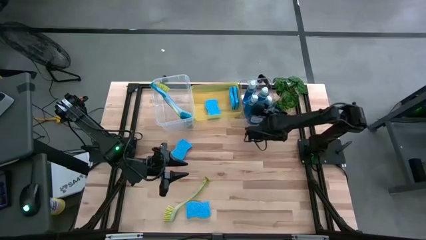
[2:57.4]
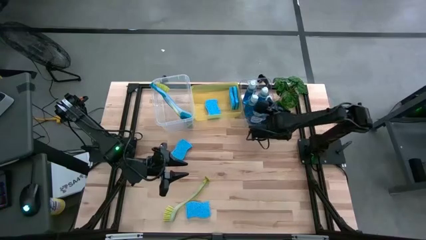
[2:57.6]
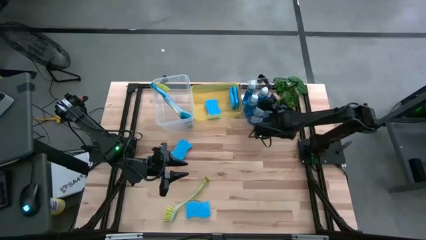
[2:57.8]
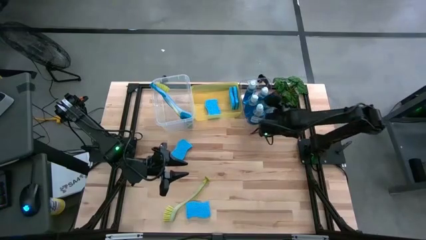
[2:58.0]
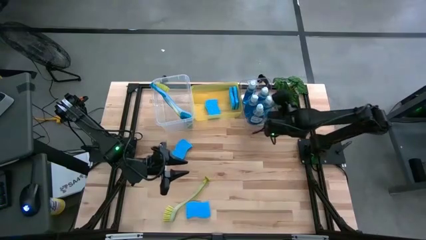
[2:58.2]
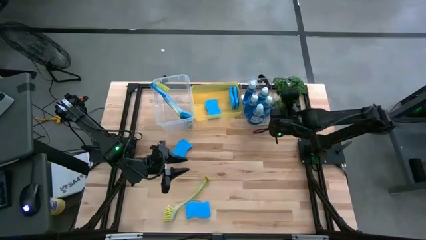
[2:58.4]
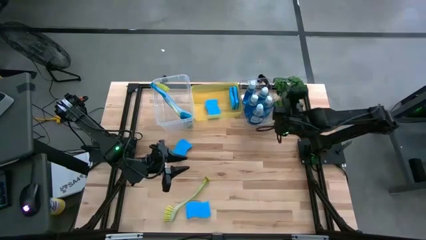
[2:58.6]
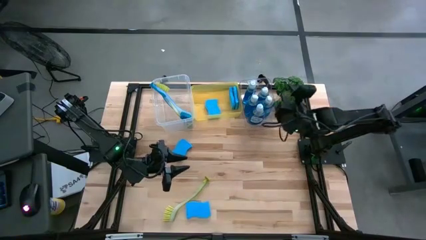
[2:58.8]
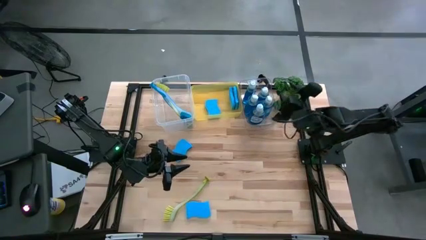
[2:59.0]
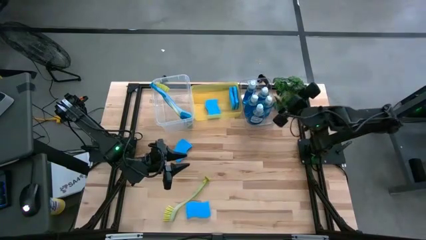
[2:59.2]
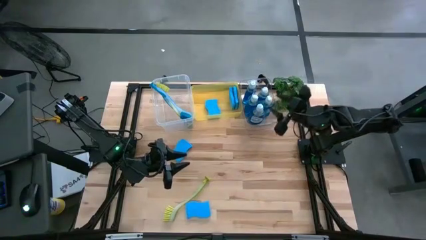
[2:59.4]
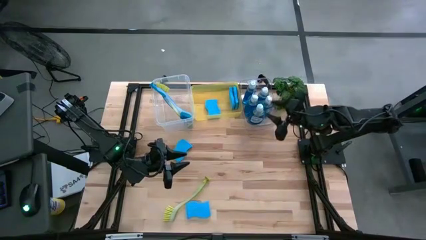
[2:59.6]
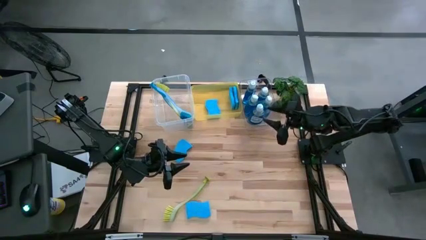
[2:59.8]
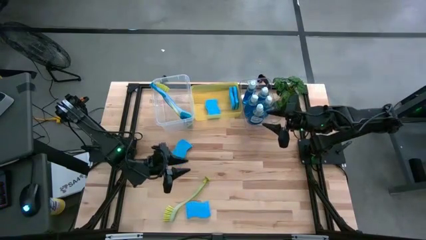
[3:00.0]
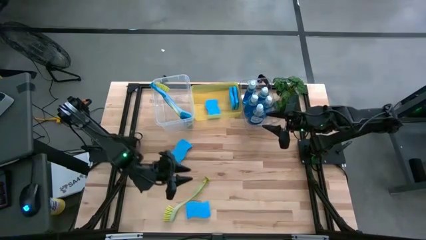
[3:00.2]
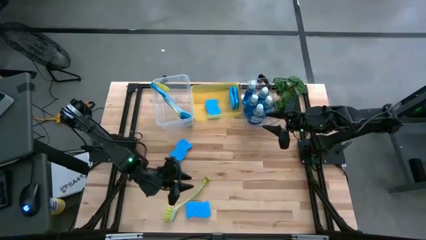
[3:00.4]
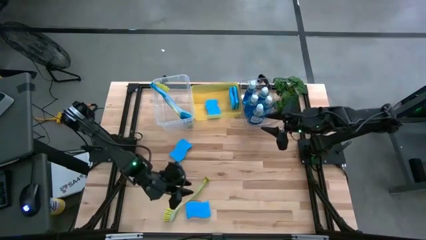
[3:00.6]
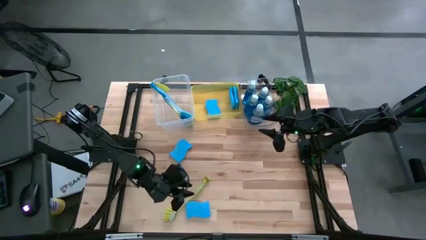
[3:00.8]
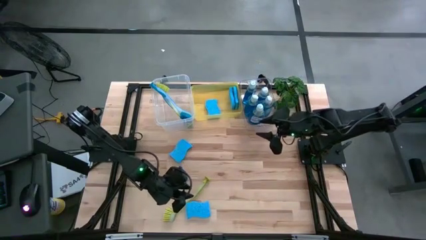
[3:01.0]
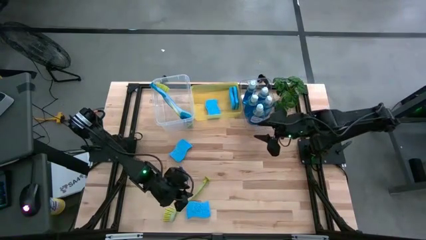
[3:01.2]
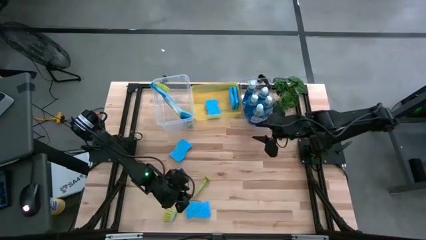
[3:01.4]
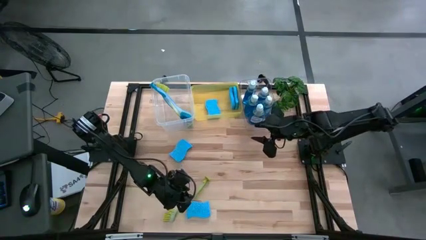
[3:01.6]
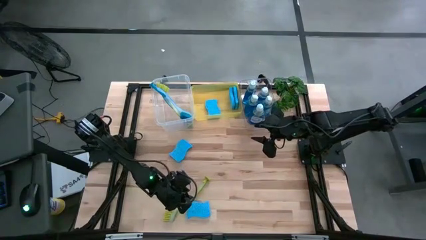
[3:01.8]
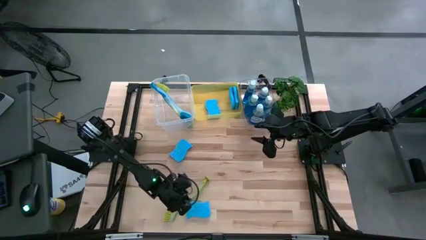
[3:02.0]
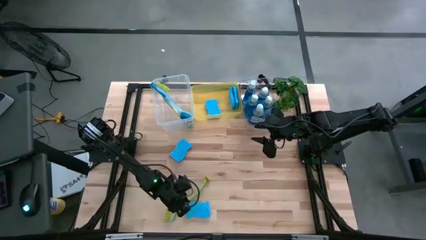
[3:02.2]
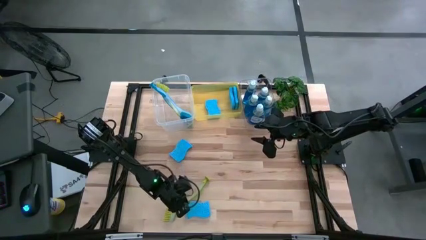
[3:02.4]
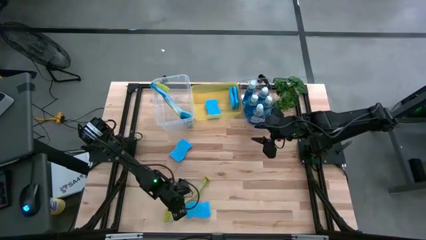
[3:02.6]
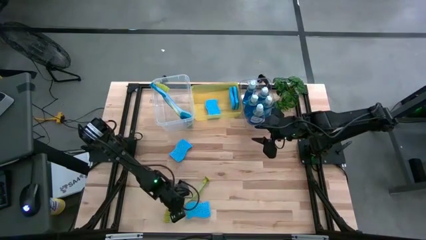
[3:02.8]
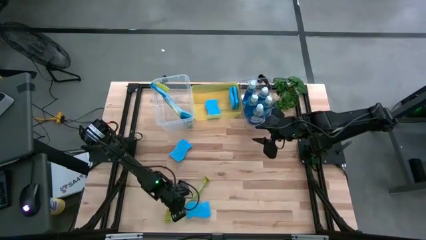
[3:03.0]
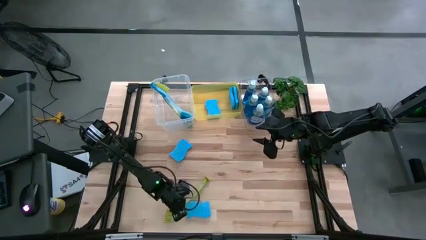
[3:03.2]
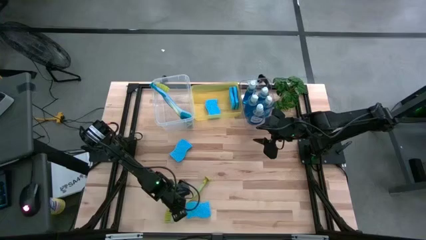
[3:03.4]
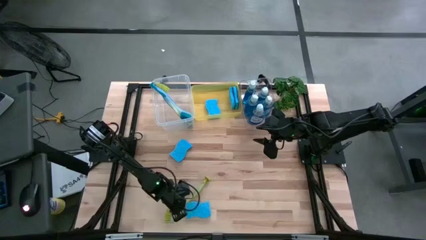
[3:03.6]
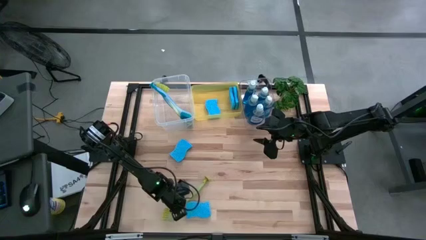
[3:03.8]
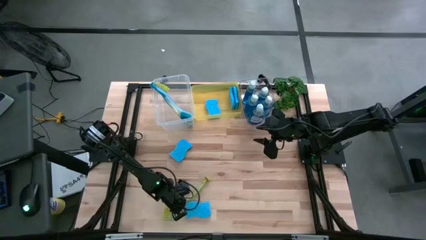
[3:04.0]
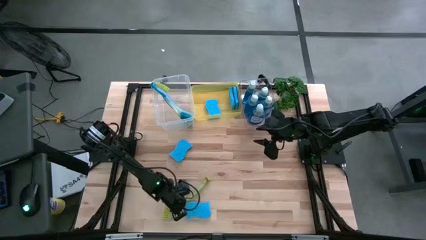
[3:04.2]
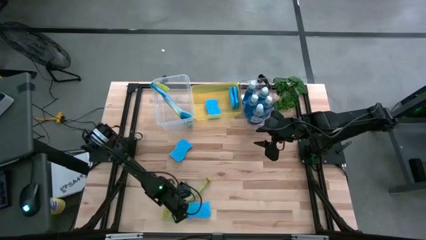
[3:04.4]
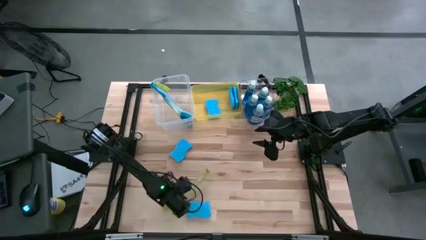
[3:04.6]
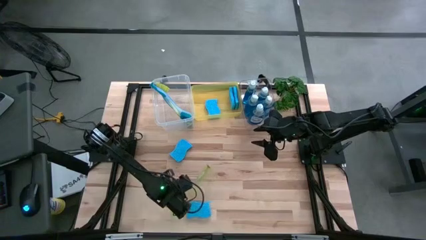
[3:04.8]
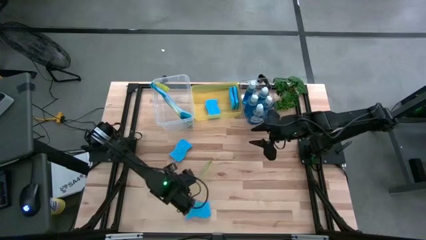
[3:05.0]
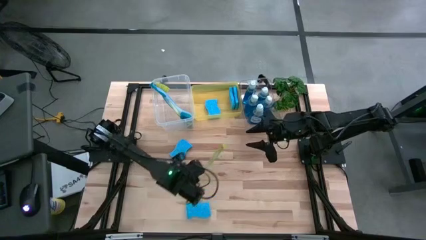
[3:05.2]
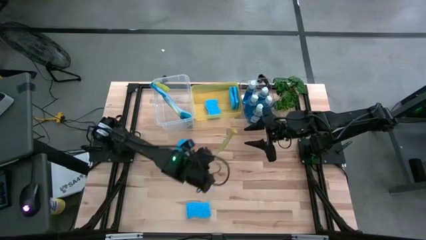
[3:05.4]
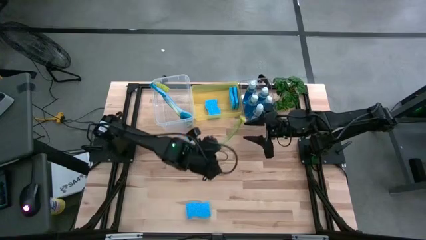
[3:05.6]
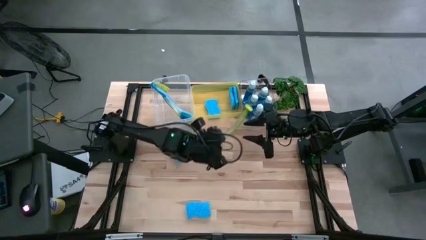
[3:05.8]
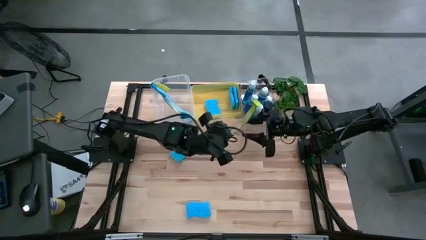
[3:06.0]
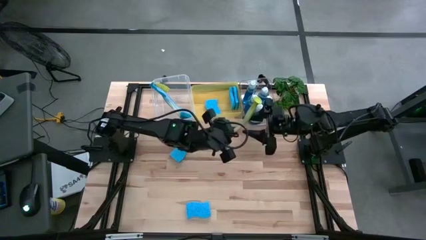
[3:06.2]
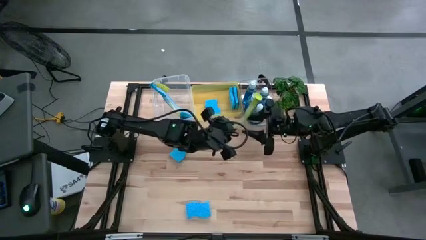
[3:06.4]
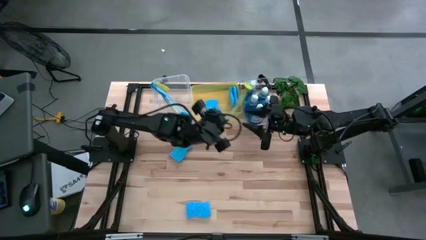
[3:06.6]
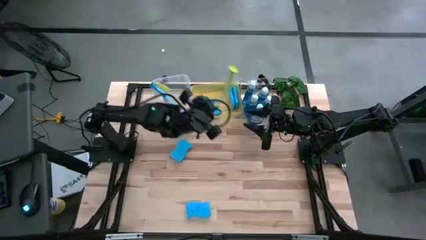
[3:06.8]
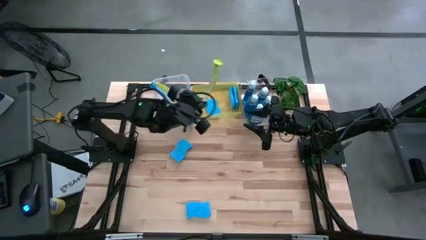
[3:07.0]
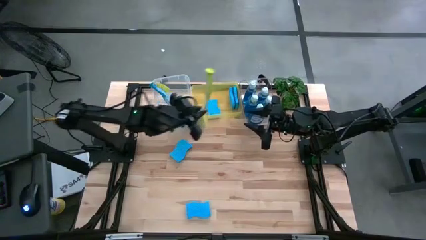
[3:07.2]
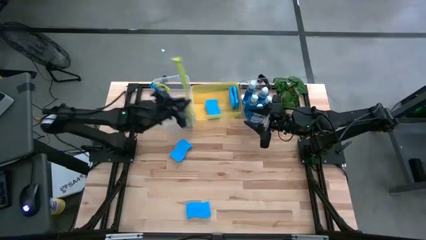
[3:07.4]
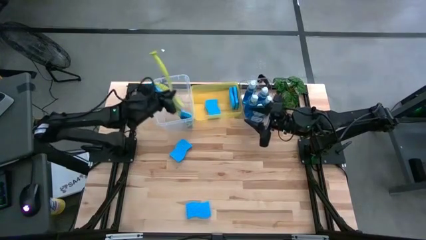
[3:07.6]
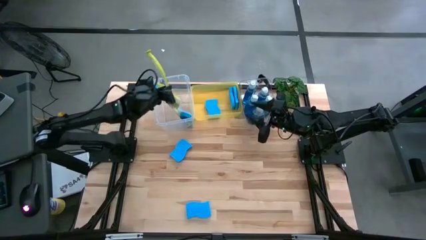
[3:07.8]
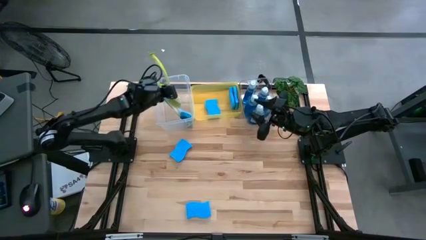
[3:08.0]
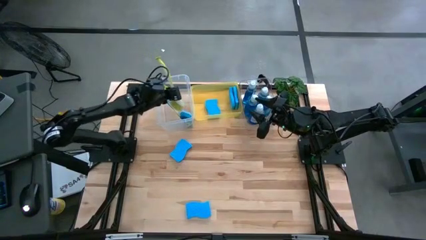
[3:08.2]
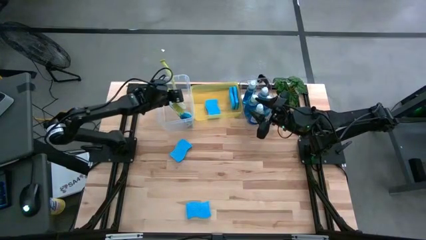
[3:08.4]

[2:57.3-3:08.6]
Task: Pick & Place Kitchen Sink Supplies
Put the yellow dish brush into the white bin

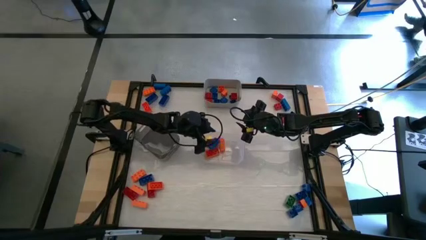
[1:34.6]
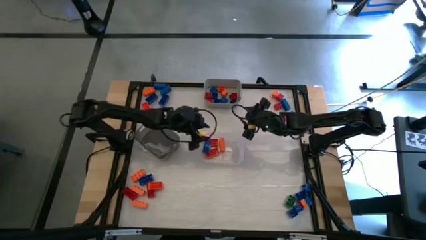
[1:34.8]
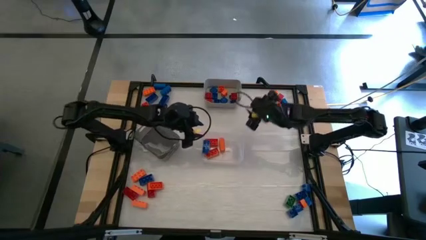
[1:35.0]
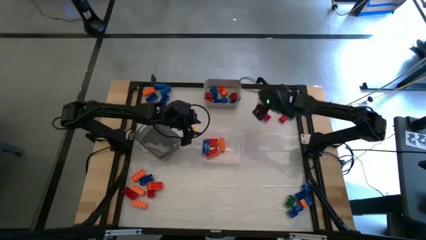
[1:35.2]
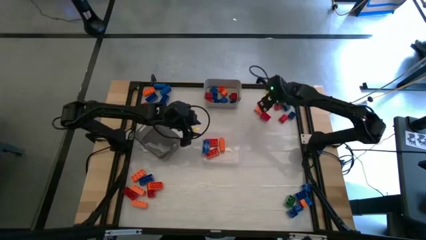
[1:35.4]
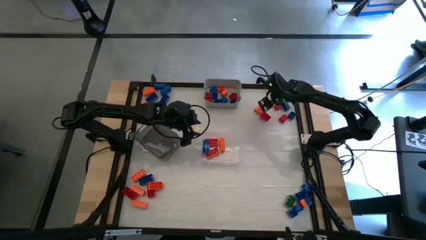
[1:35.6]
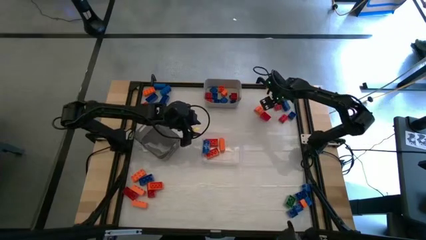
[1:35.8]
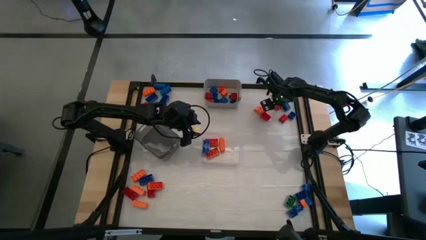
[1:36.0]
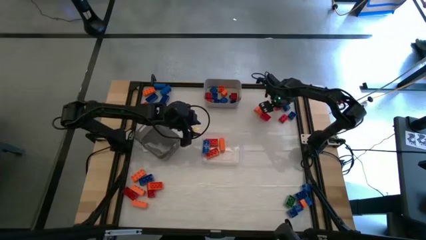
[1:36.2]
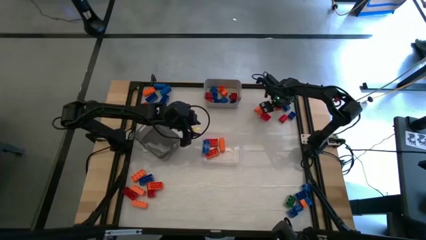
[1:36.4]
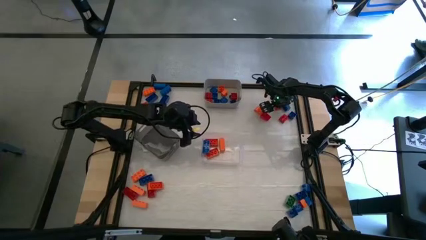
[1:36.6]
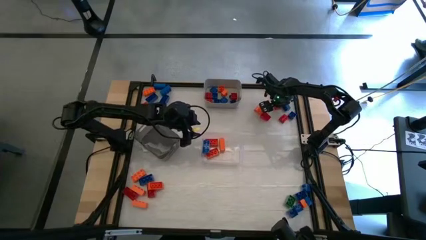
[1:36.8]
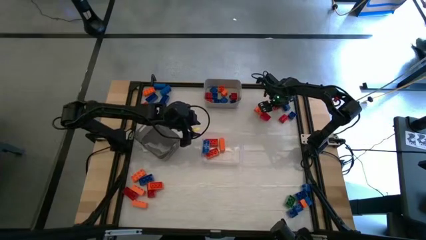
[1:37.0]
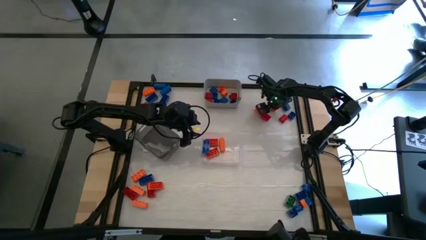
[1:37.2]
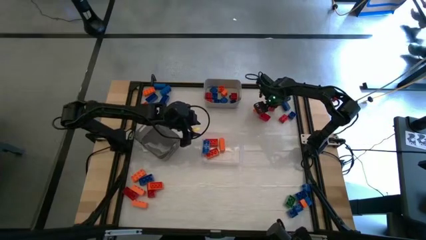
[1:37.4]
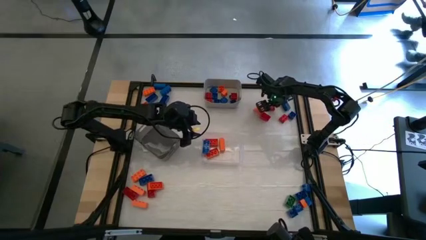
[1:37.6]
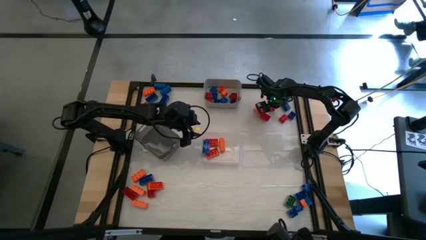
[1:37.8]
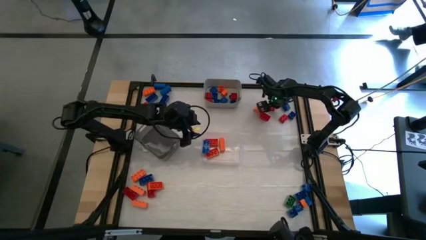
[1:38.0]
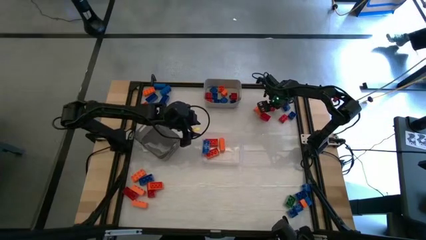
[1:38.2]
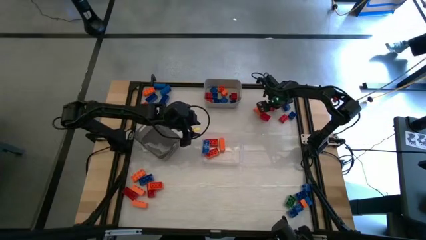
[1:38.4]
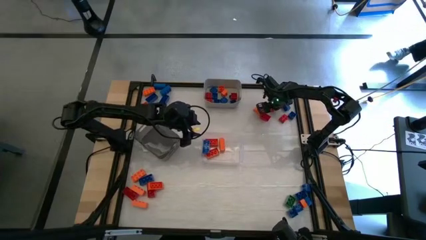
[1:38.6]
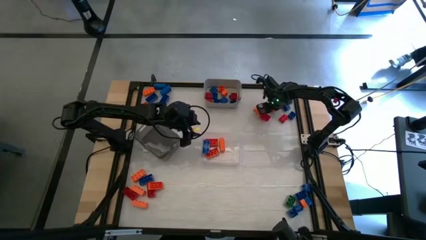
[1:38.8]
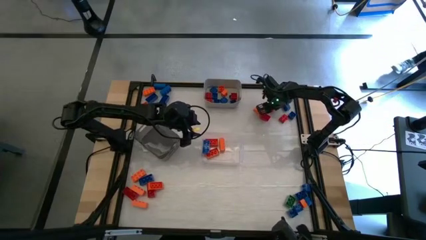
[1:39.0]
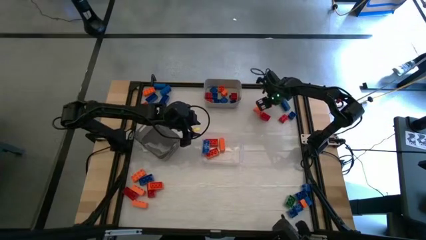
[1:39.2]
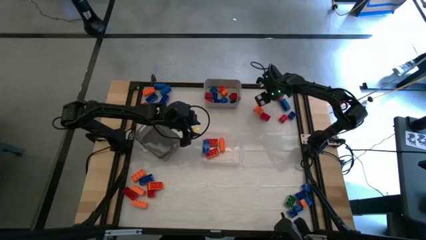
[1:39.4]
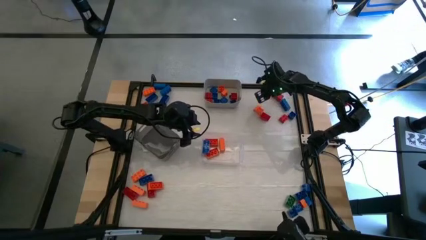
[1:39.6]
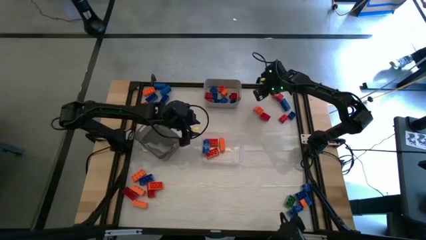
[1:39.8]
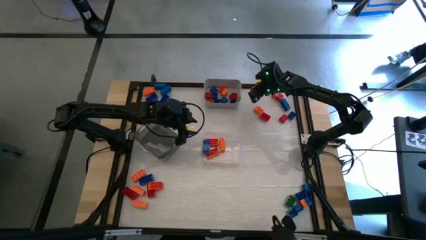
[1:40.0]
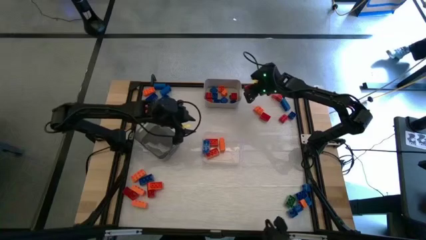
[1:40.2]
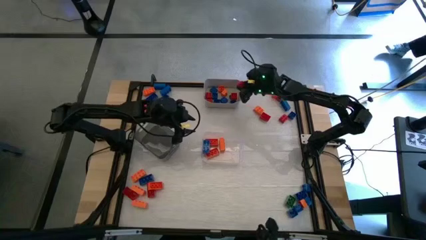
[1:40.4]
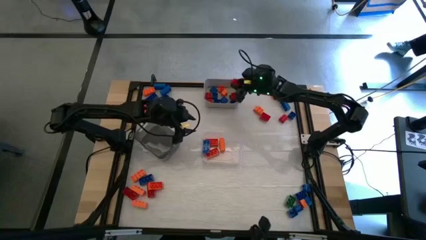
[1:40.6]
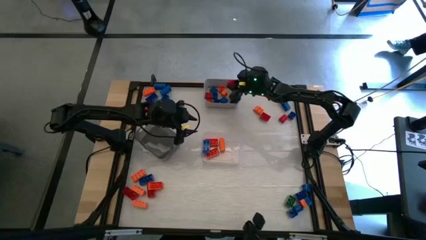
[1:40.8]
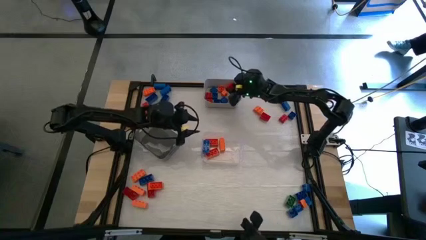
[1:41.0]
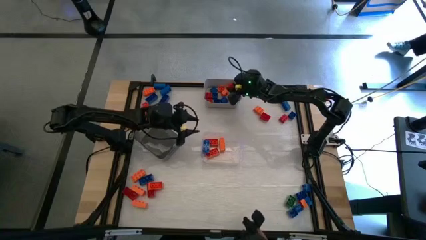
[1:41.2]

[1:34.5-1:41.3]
Task: Sort blocks by size
Put the small red game piece into the gray bin
